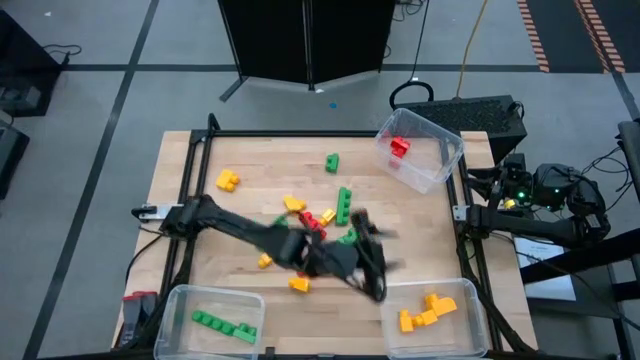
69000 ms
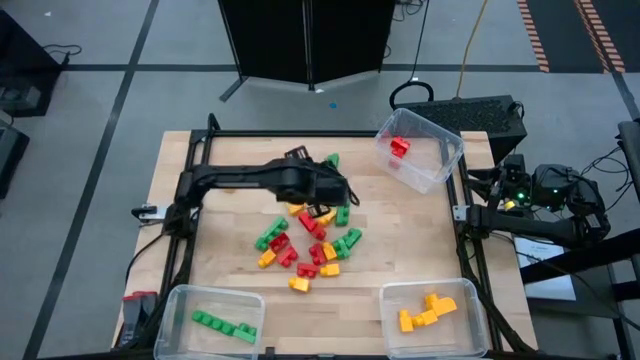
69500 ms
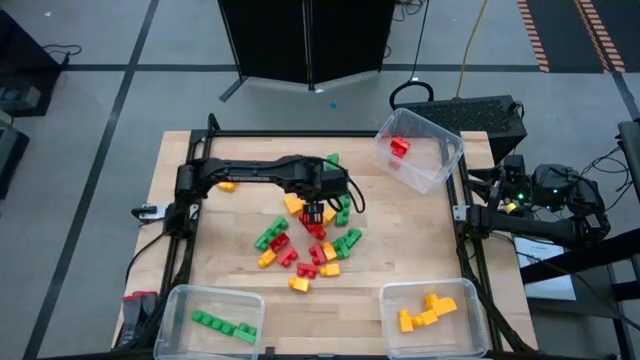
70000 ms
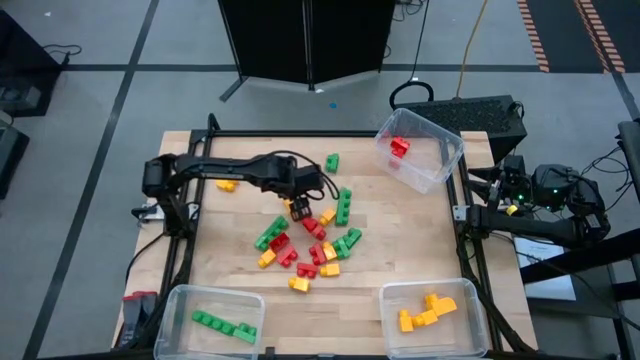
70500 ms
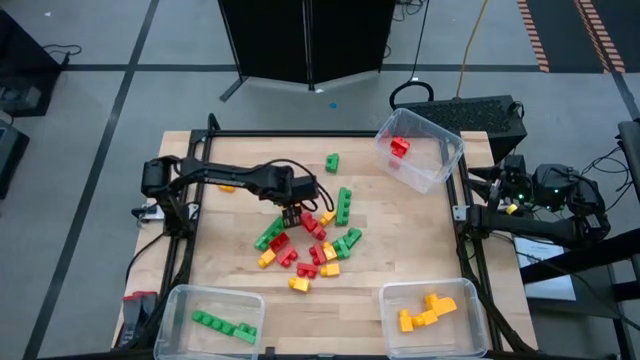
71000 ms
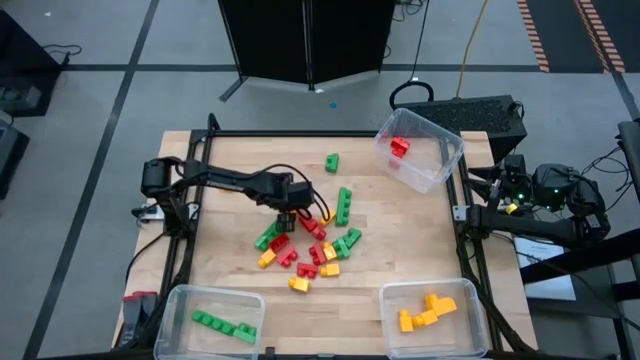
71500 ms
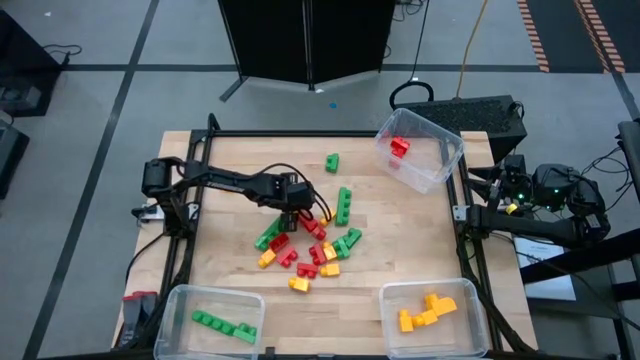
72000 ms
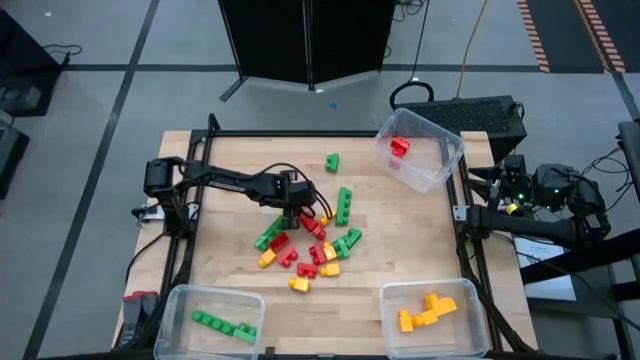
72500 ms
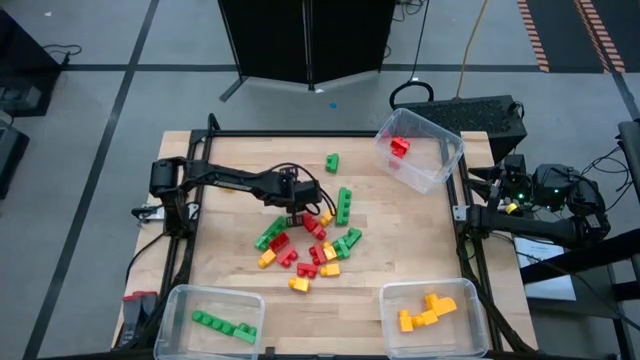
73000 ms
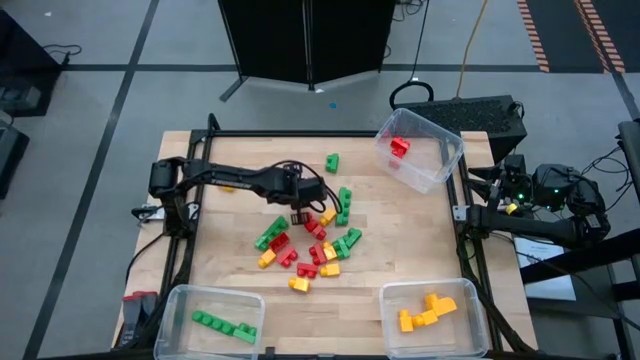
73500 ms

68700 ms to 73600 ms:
Task: Sort blocks
Put the yellow game piece into the bottom right transparent bin

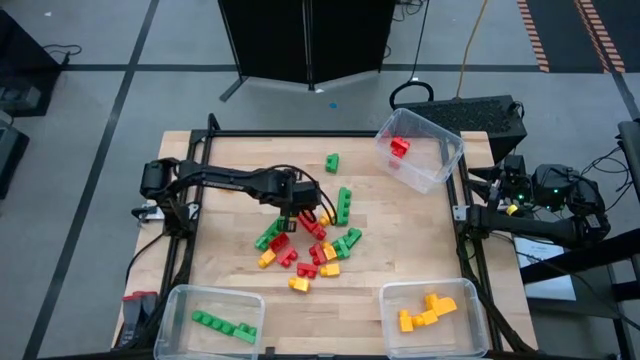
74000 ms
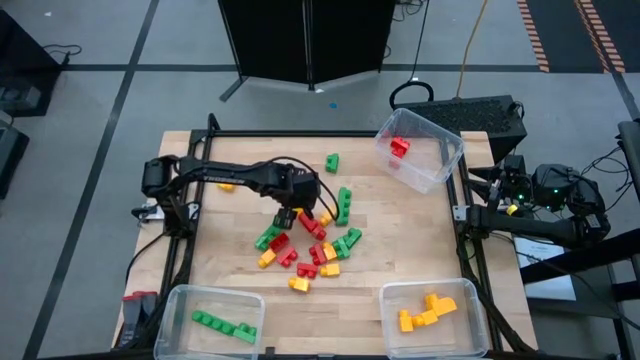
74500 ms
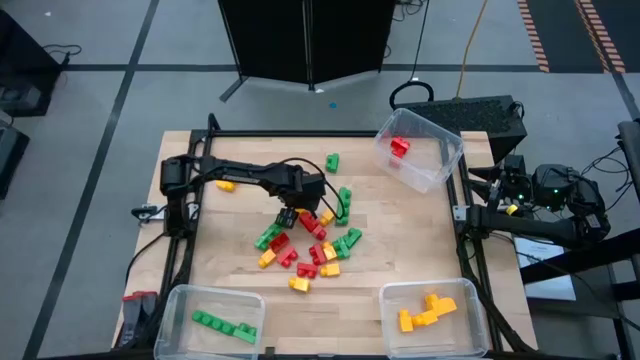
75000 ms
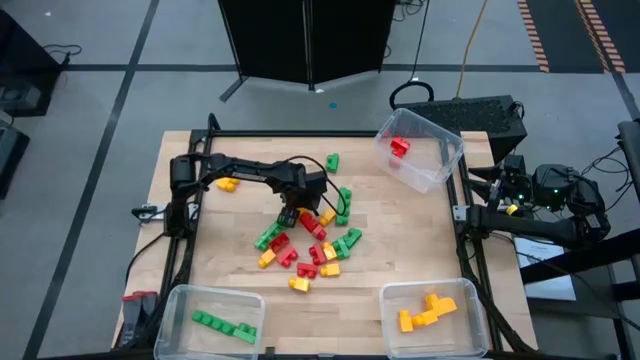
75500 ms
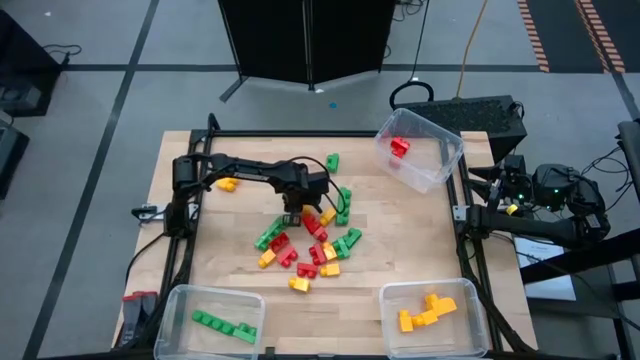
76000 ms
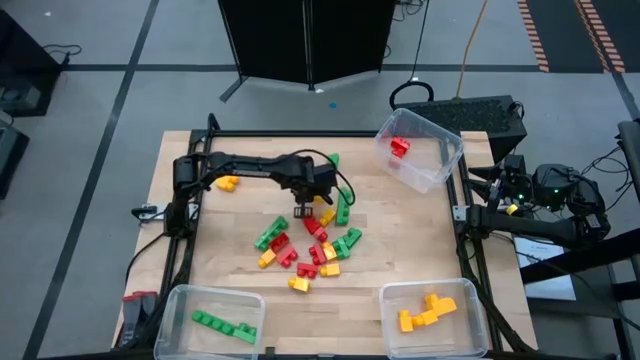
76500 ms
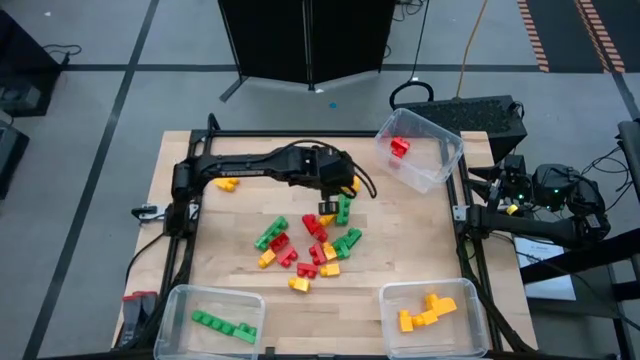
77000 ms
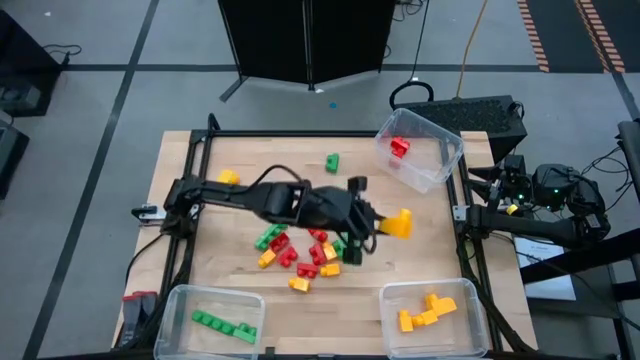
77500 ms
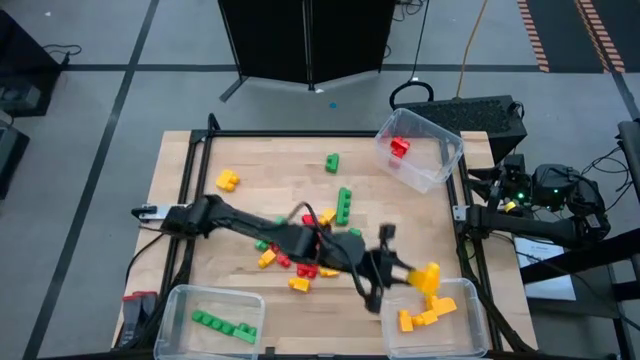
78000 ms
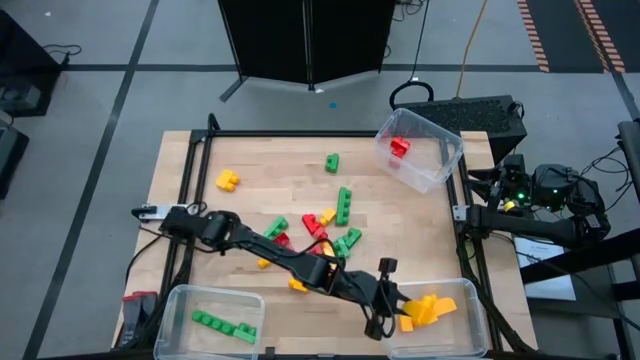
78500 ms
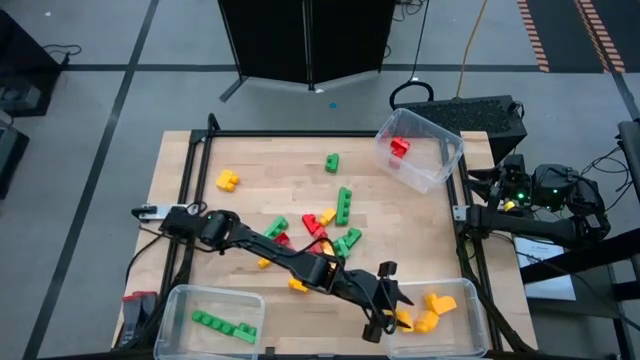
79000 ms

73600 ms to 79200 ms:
Put the yellow game piece into the bottom right transparent bin

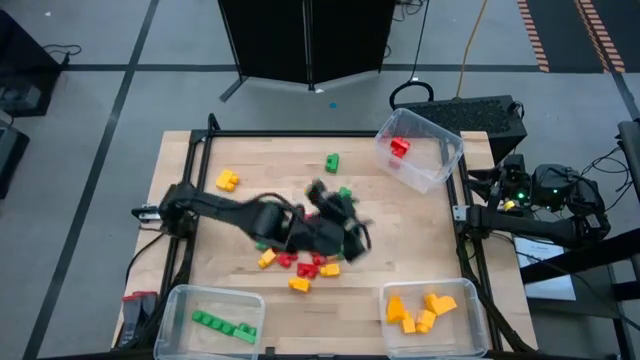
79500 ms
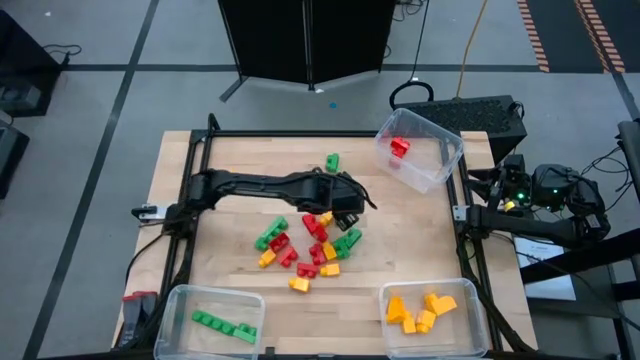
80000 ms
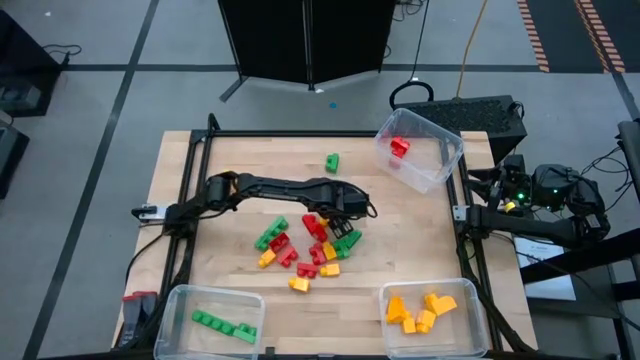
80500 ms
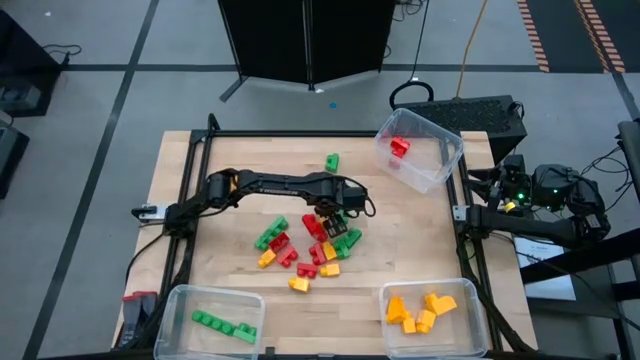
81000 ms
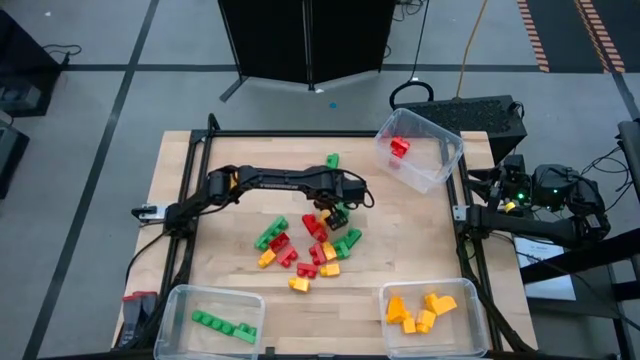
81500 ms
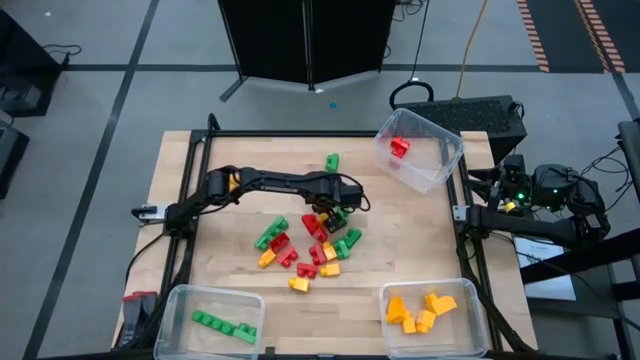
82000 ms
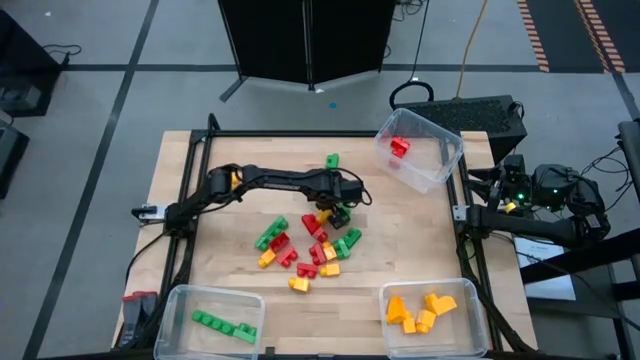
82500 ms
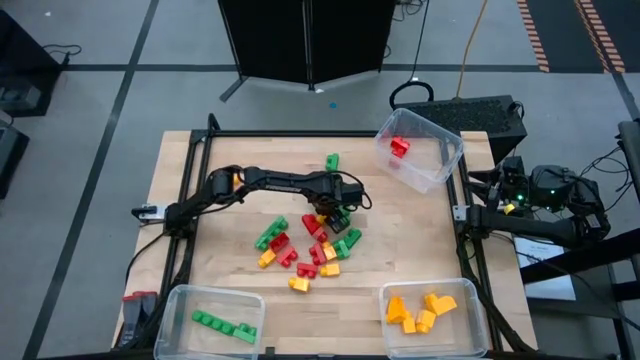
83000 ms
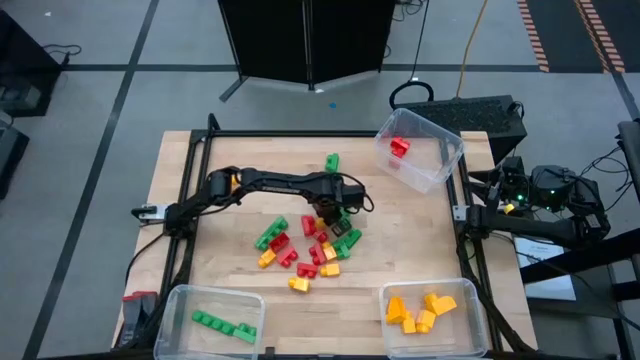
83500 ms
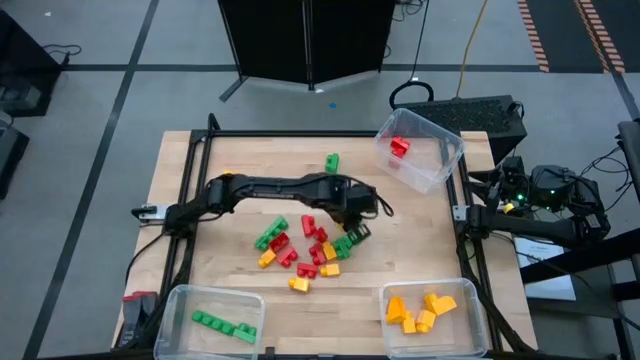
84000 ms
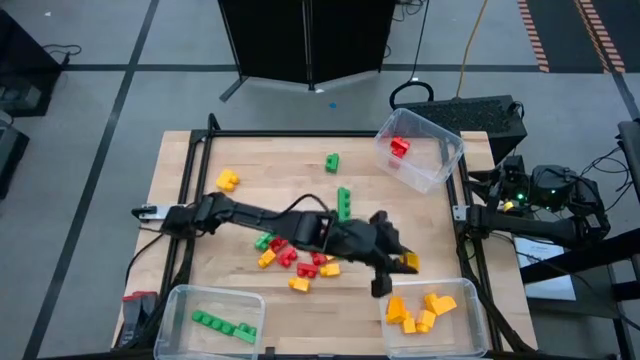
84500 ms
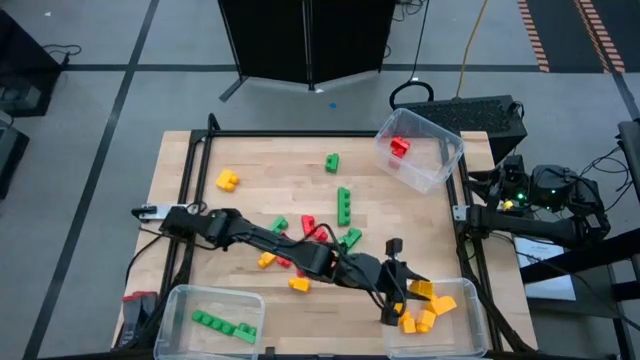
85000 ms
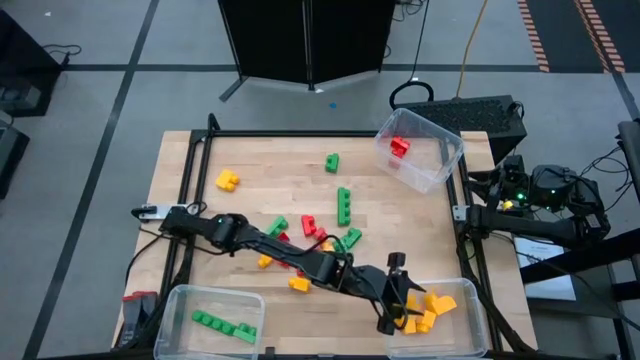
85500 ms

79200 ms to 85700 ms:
Put the yellow game piece into the bottom right transparent bin

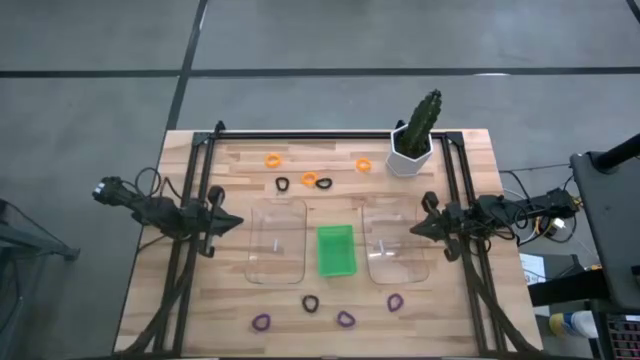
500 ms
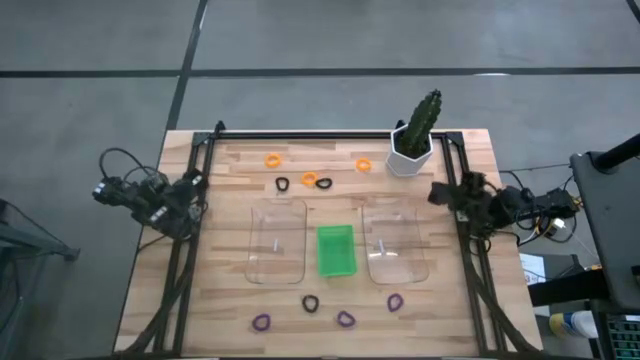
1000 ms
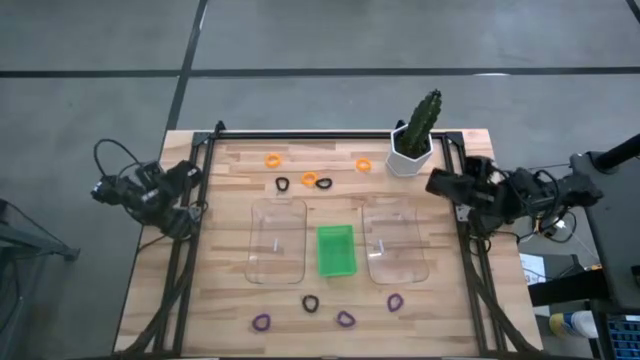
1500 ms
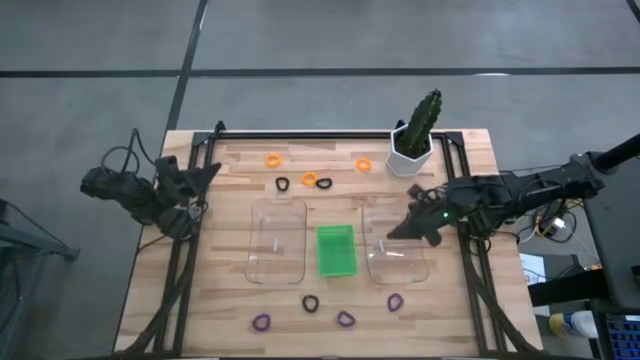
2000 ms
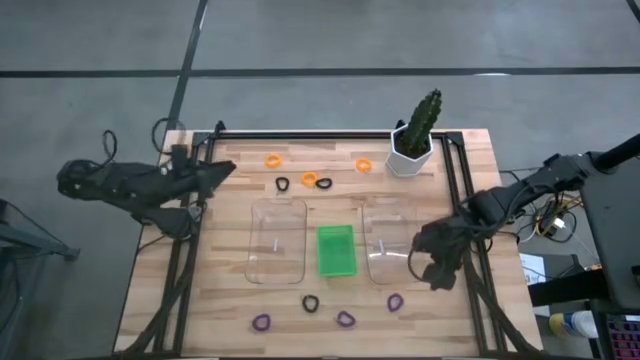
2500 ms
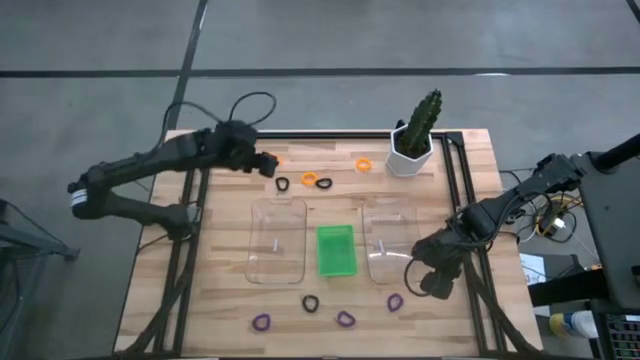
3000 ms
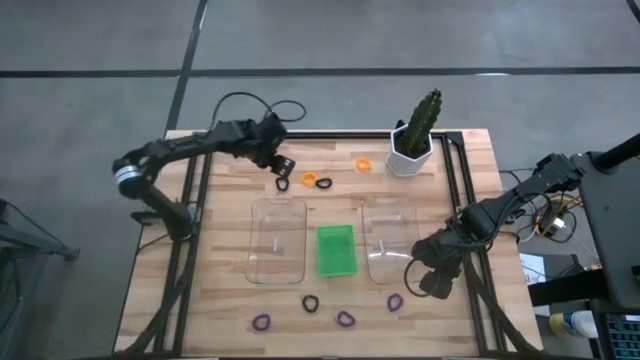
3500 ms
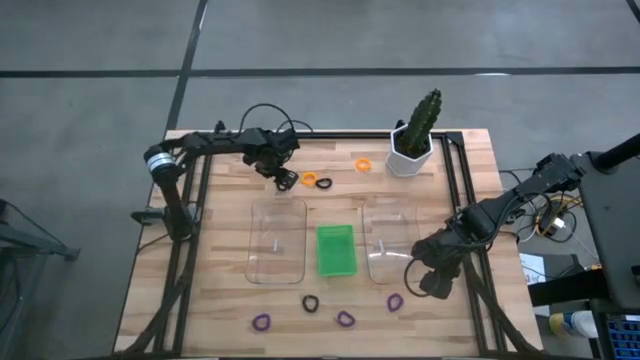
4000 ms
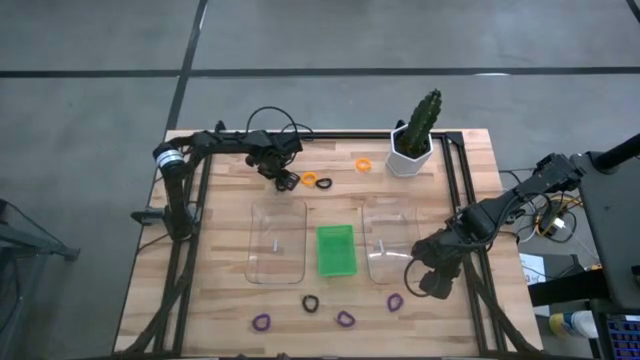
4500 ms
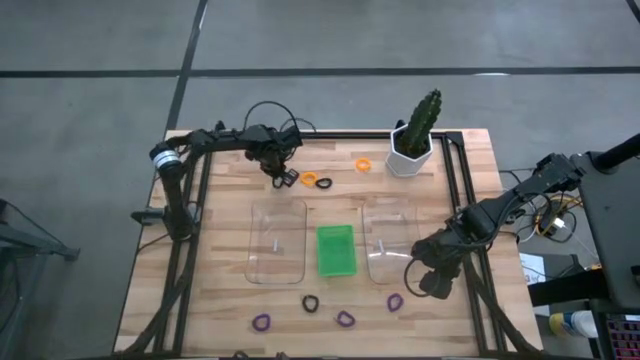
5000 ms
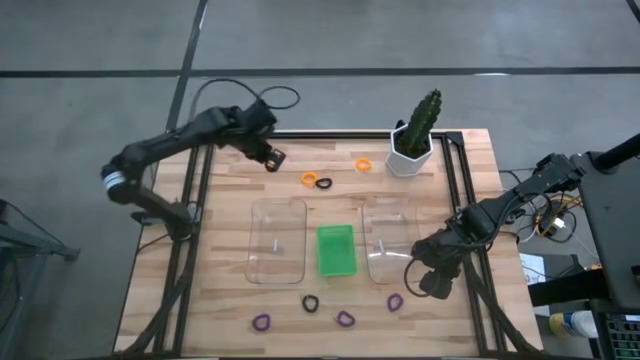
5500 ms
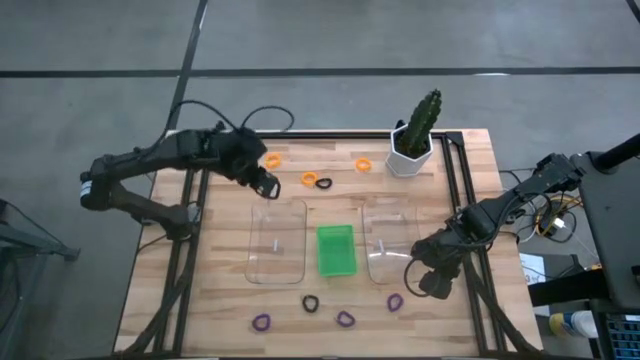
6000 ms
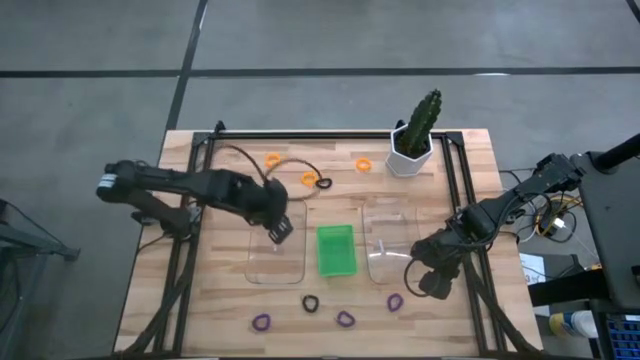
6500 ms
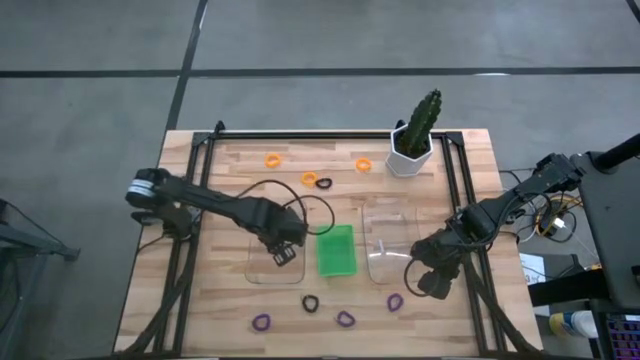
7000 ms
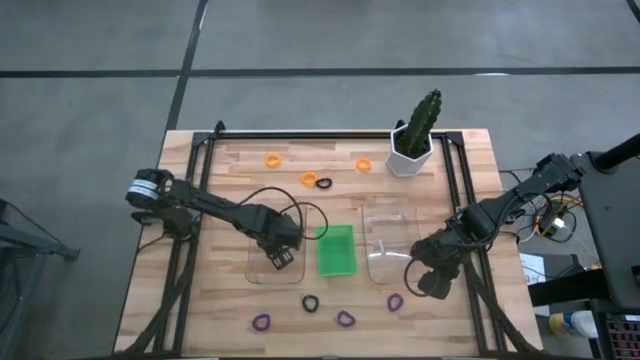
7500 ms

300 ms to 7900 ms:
Task: Sort spring keychains
Put the top left black spring keychain into the left transparent bin
